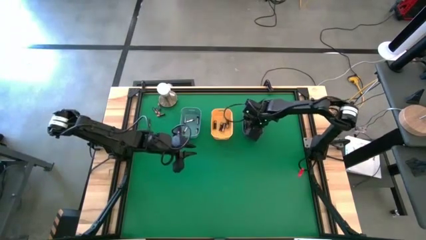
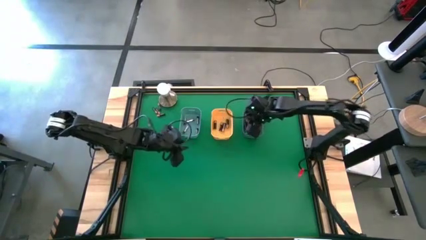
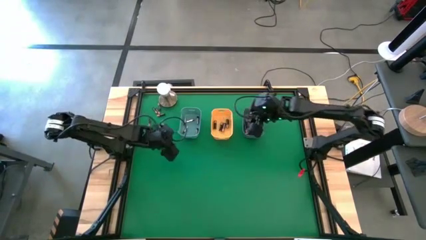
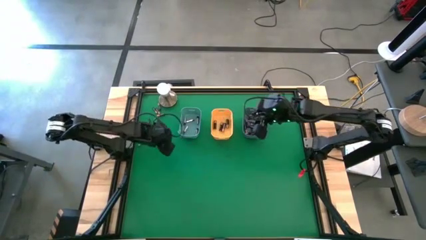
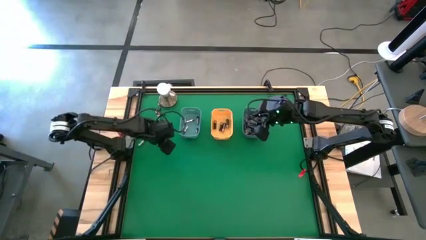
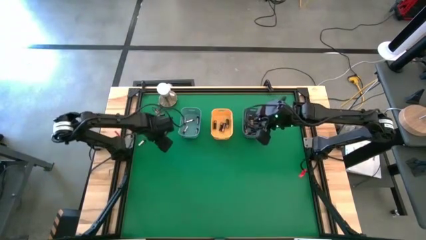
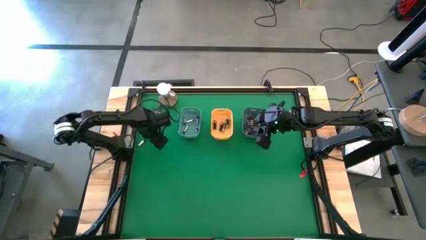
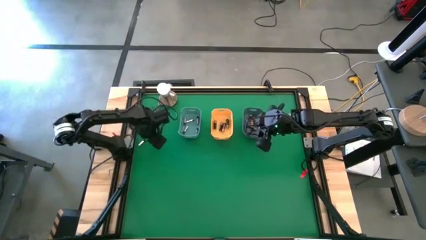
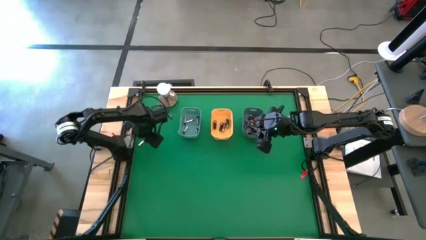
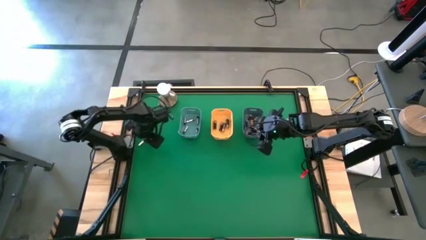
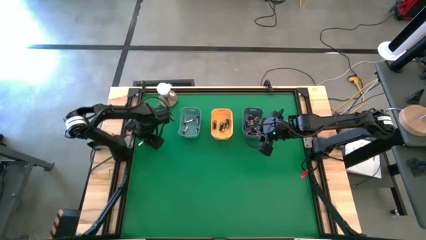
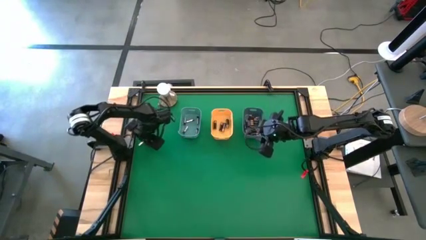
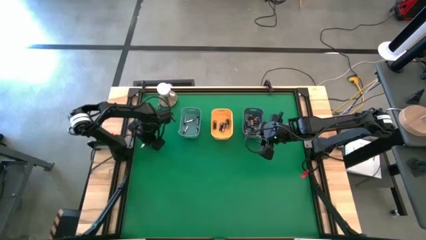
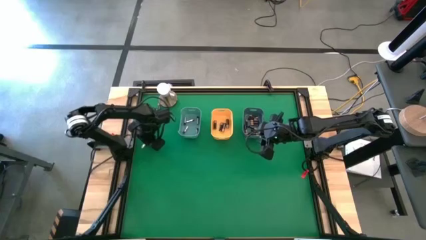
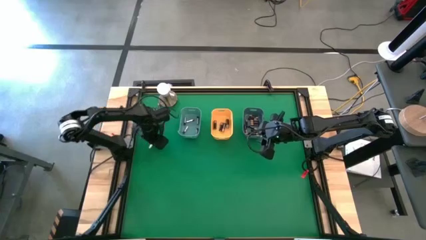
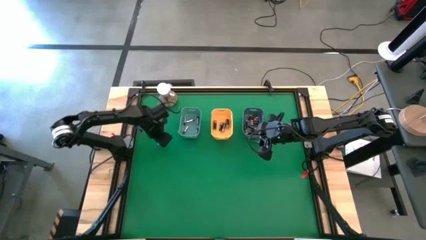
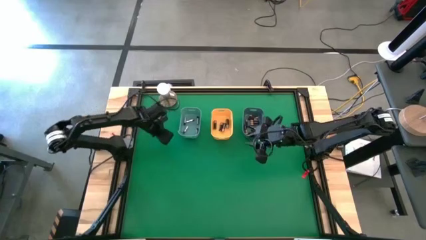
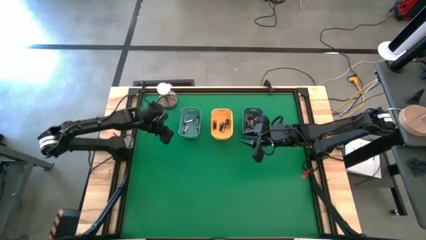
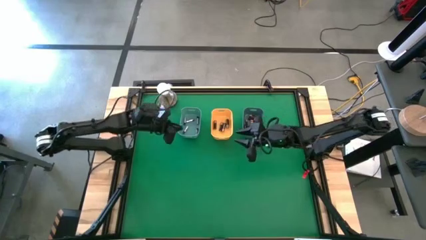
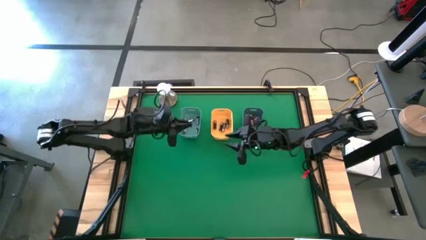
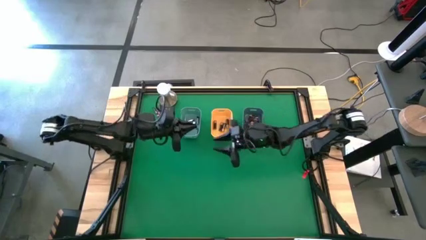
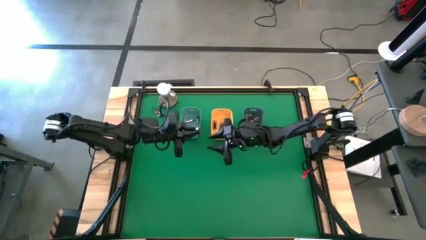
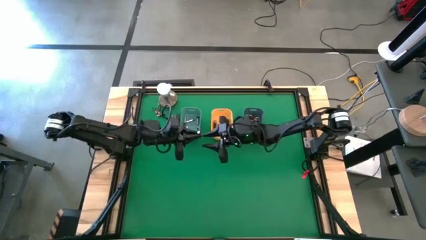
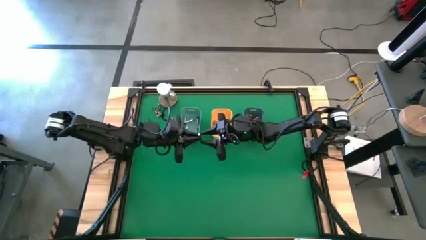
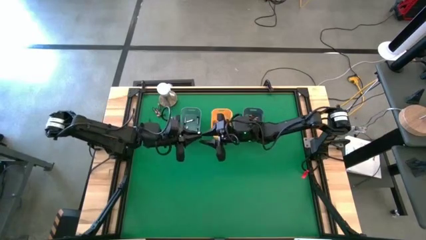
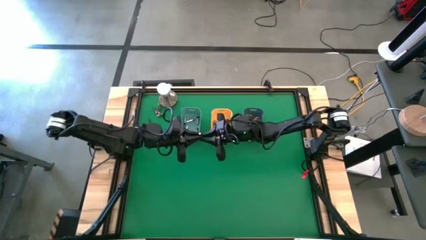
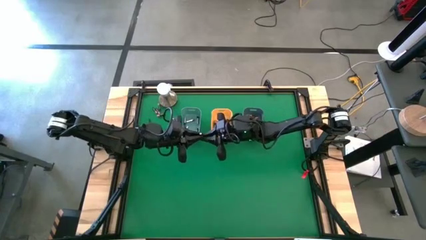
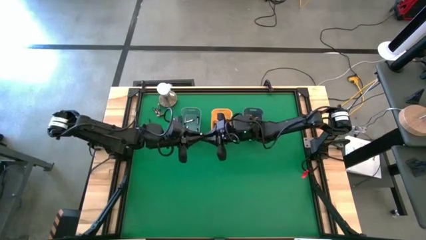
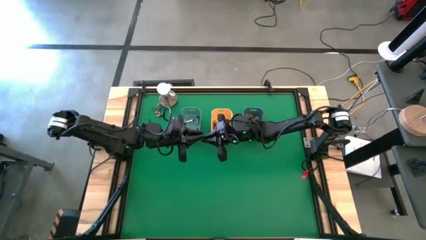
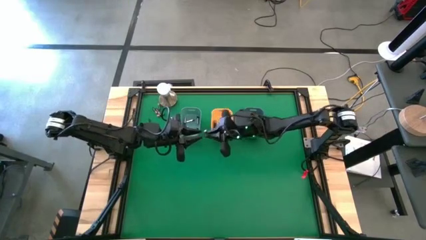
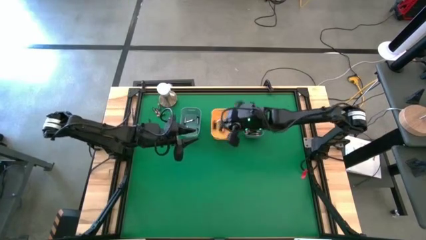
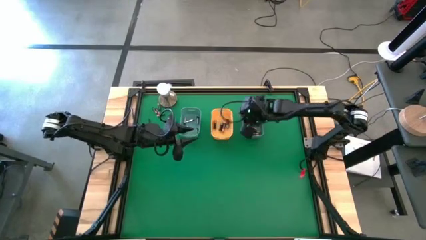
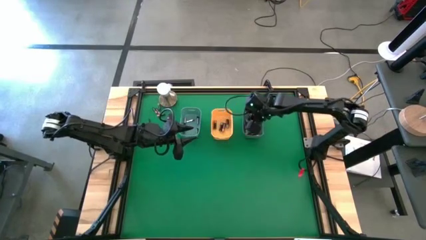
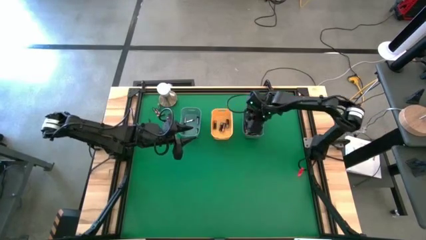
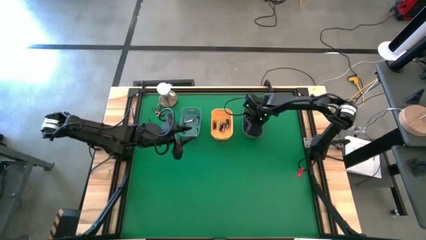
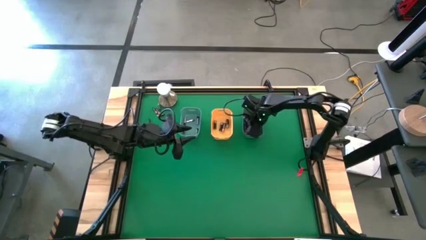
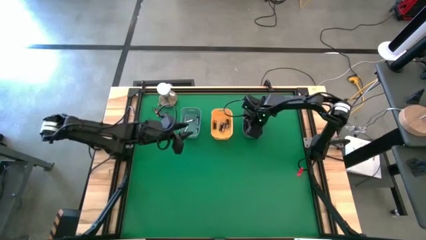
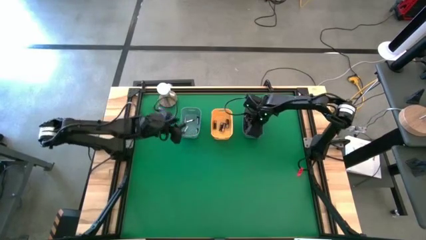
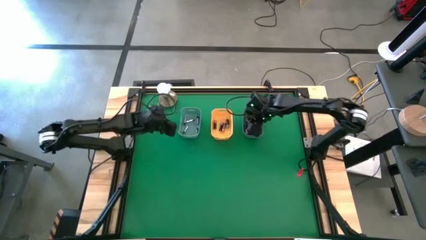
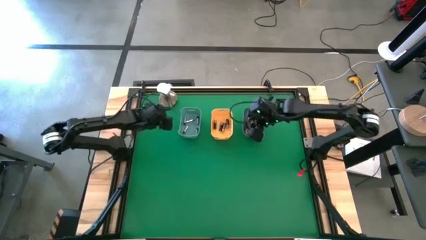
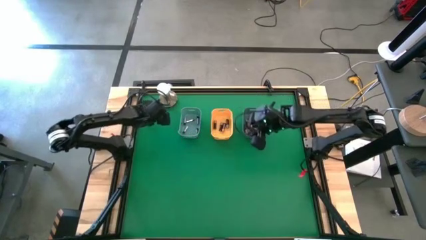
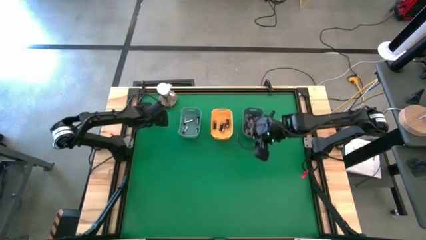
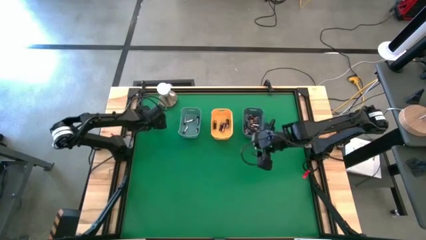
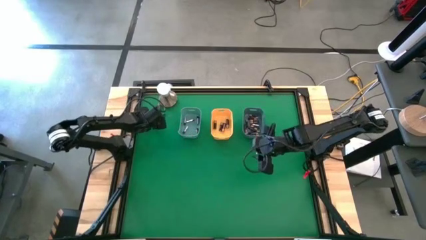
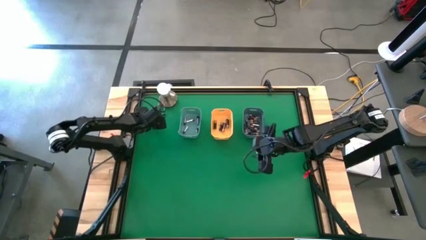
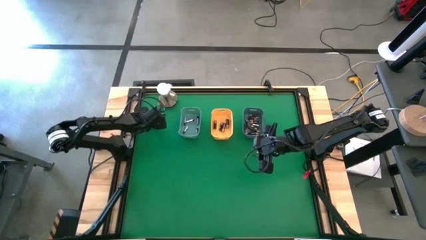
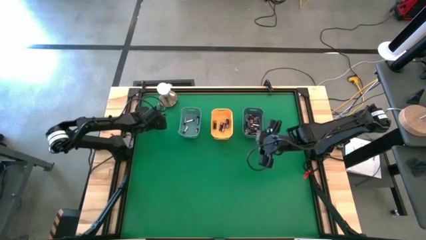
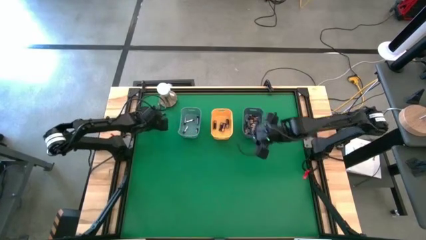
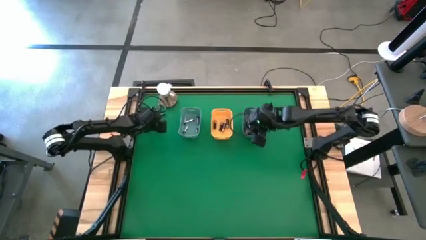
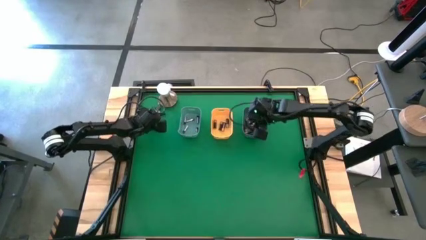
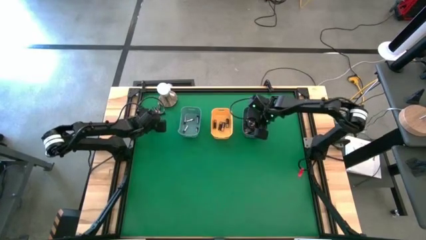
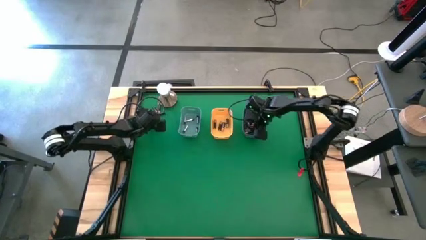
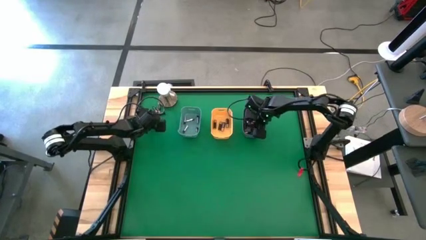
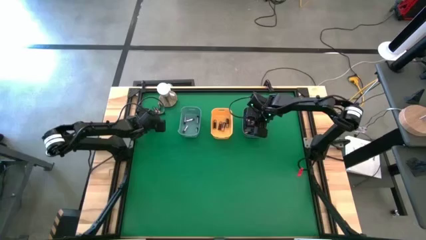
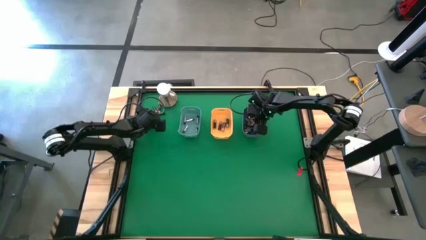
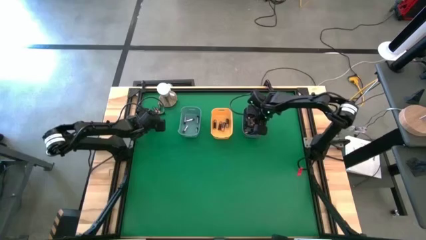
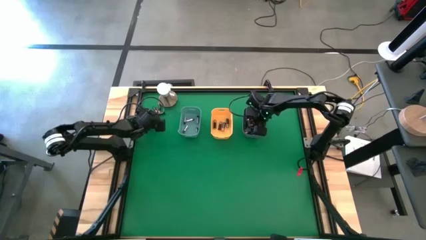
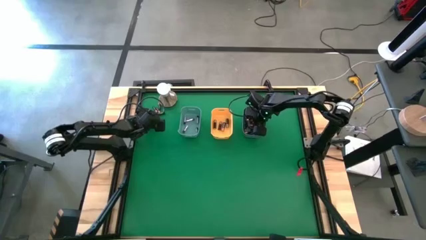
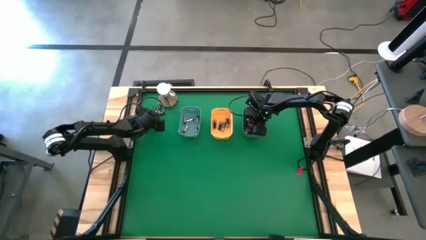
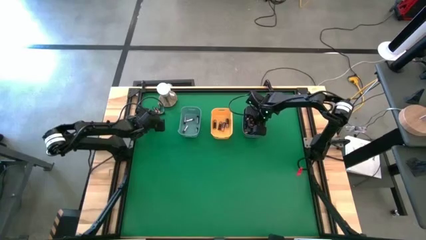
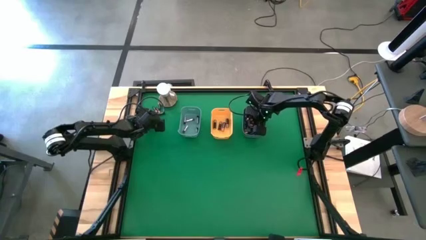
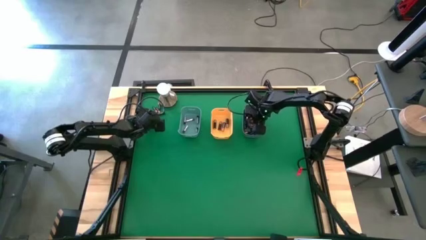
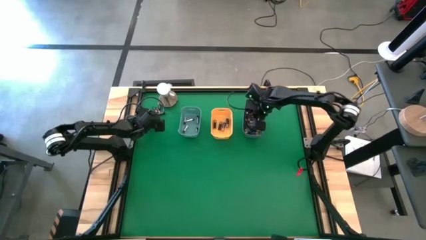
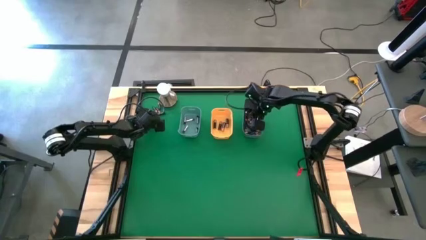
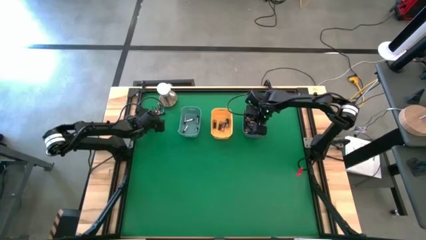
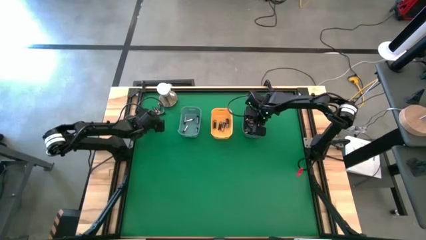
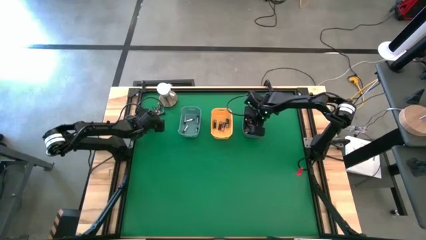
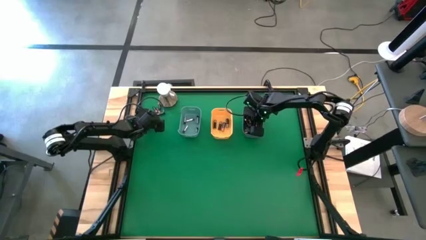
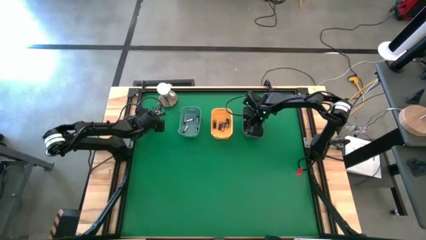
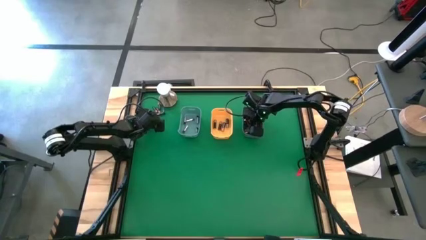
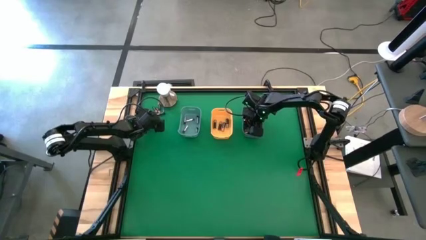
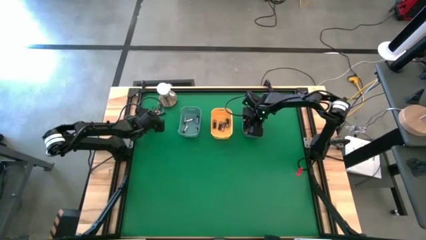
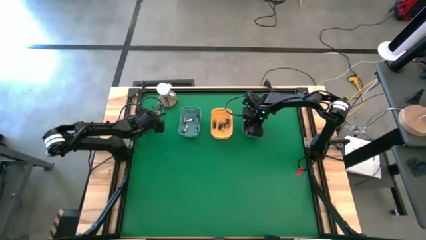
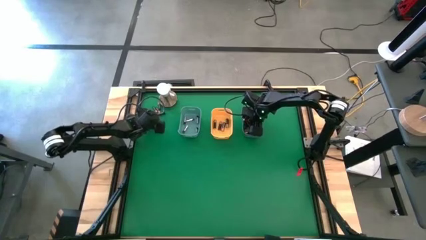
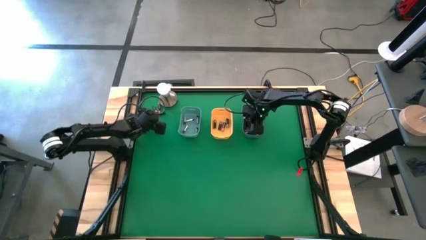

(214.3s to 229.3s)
Task: Sort batteries
Put the silver battery into the green bin
